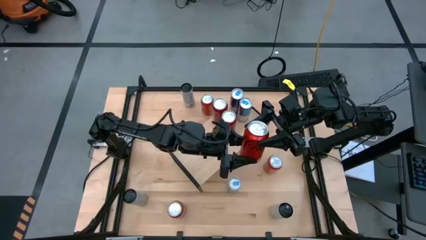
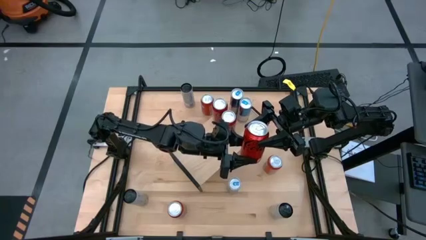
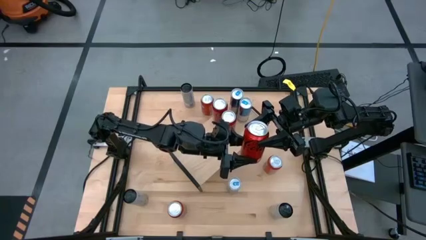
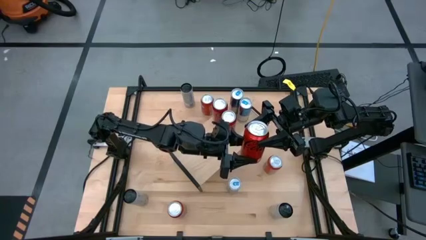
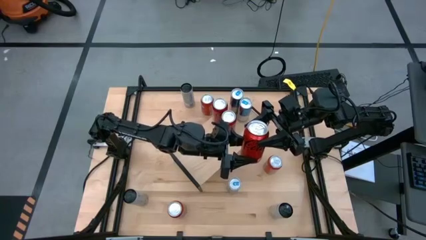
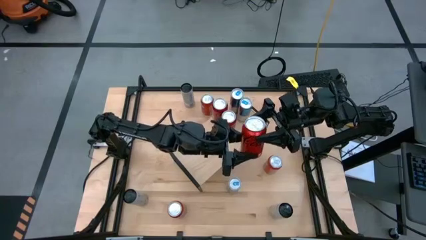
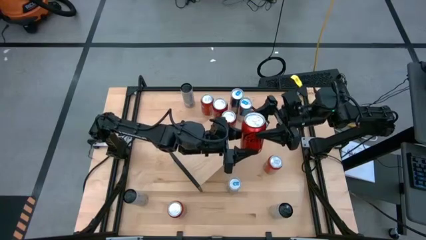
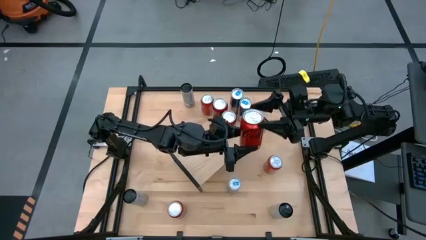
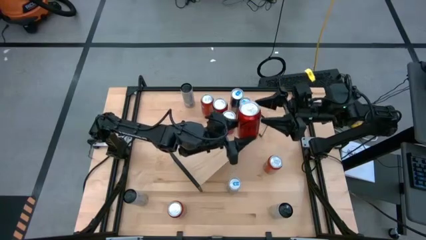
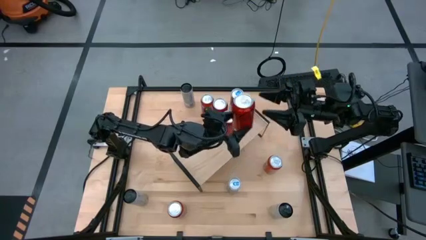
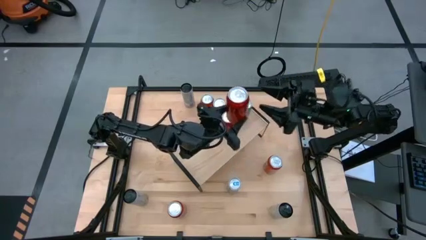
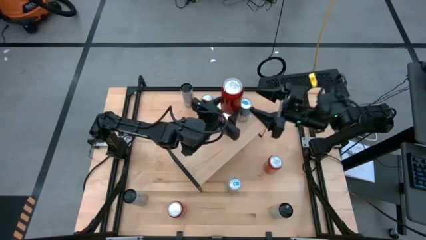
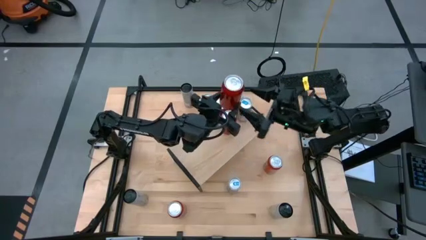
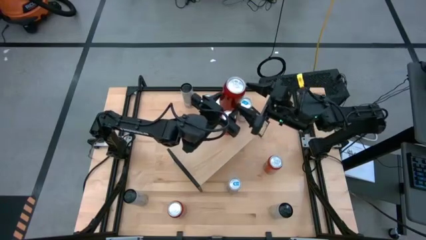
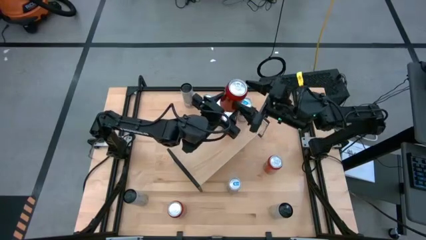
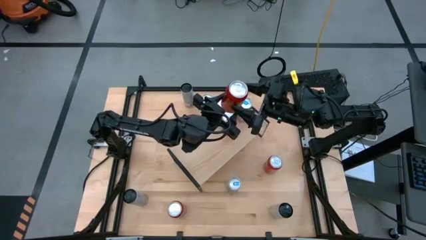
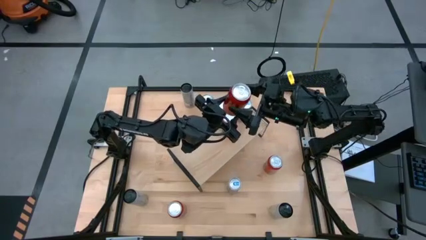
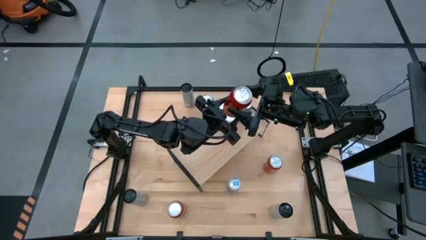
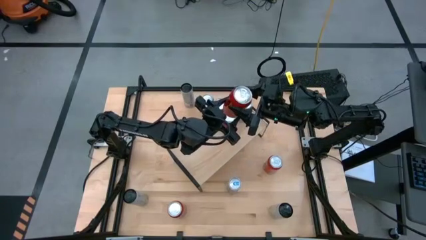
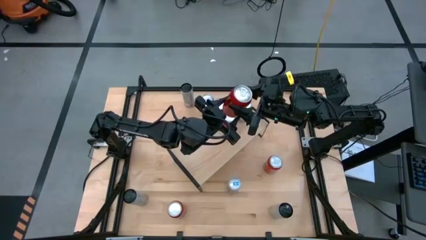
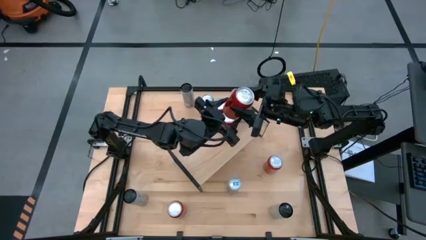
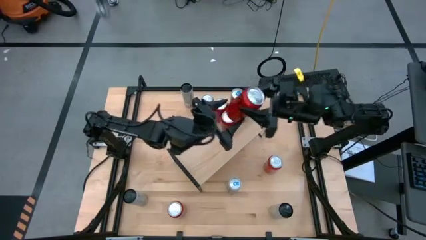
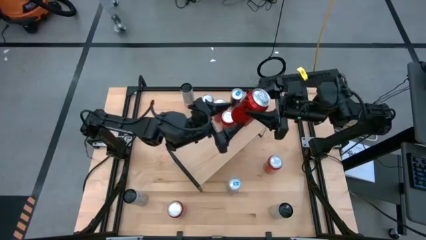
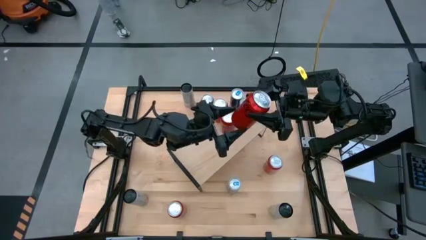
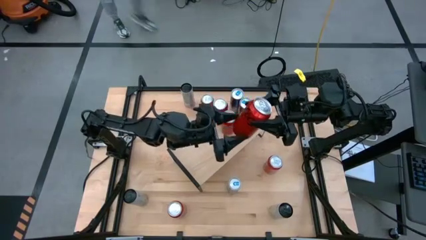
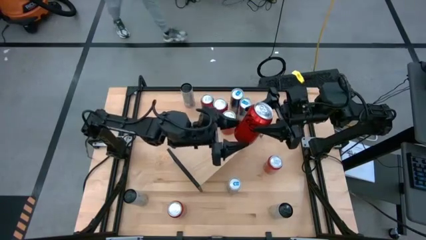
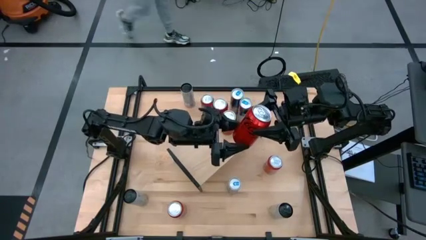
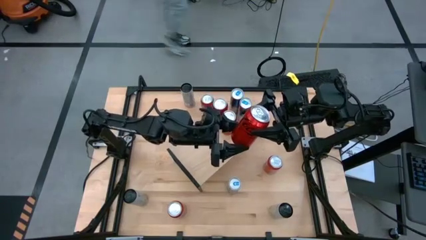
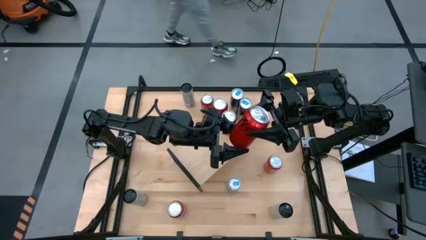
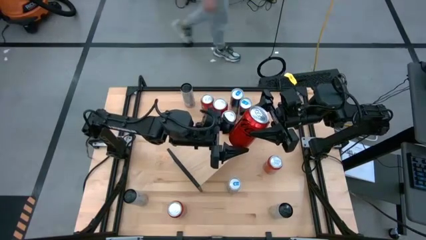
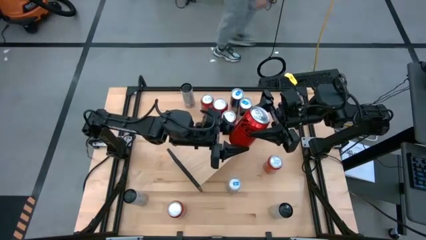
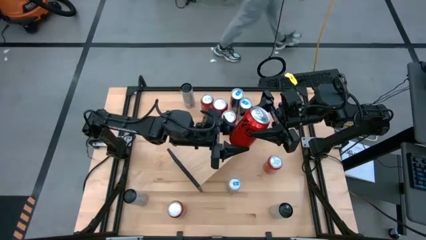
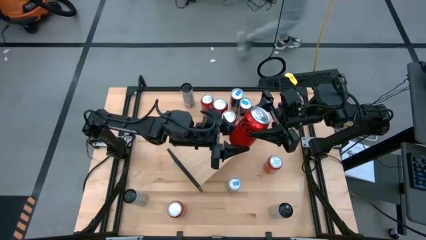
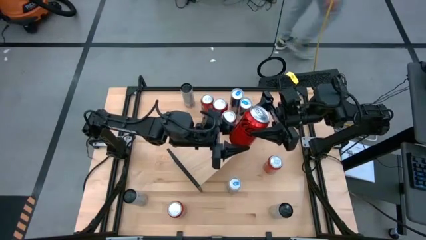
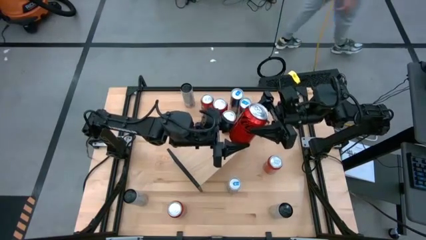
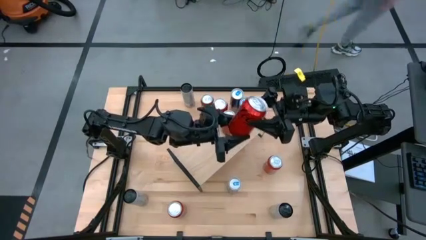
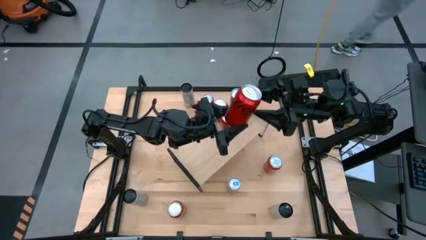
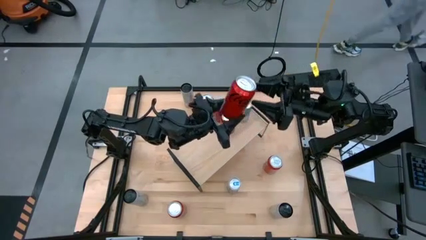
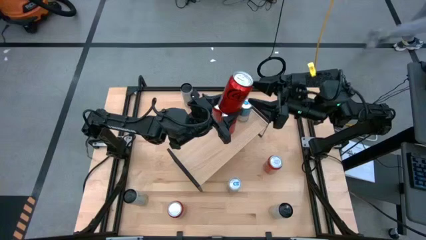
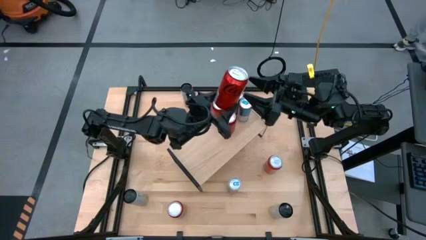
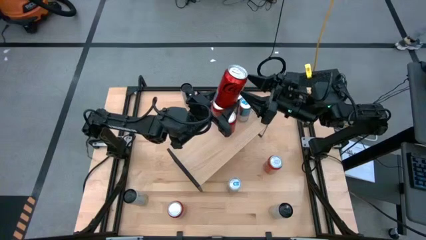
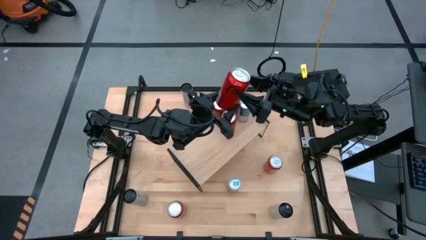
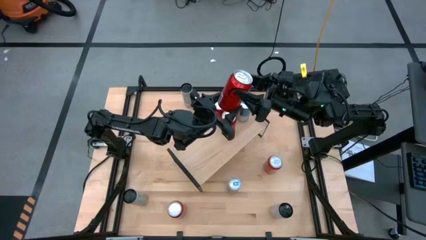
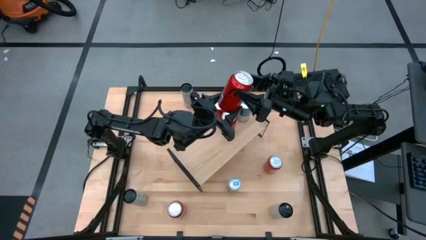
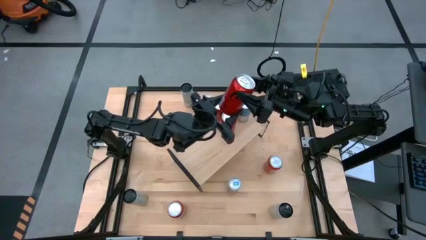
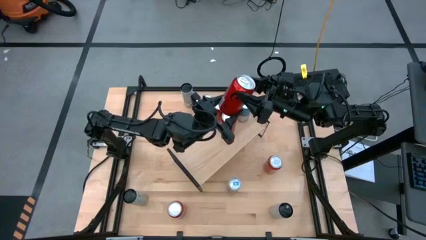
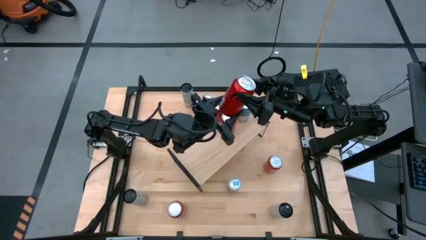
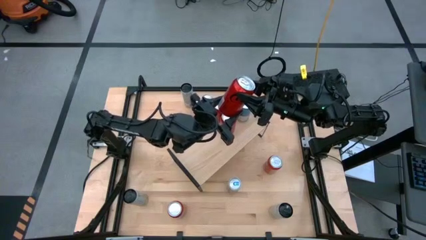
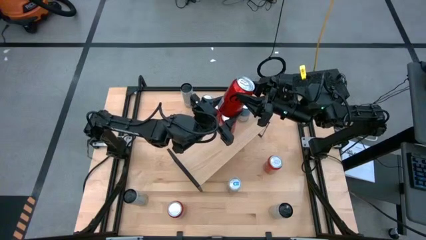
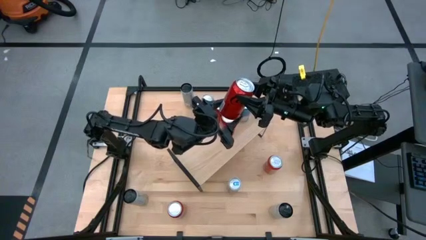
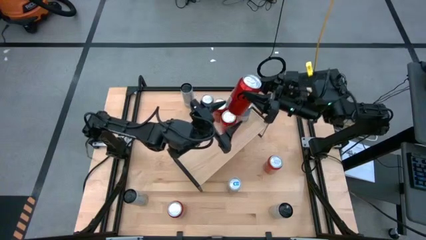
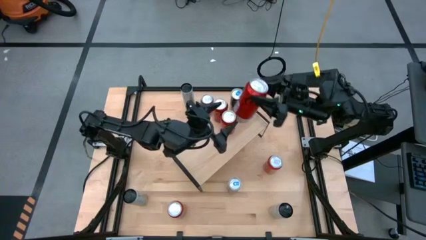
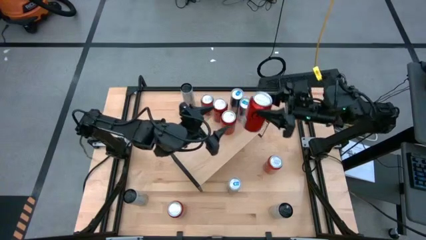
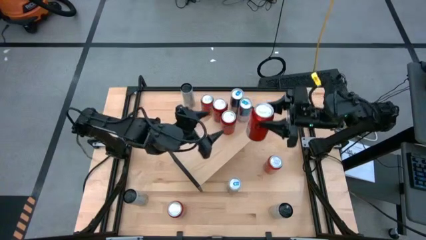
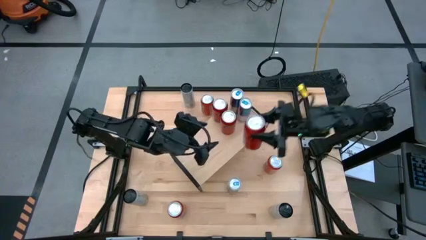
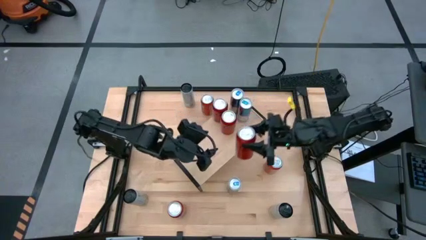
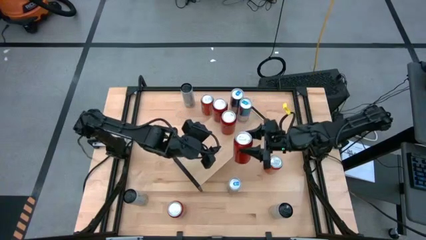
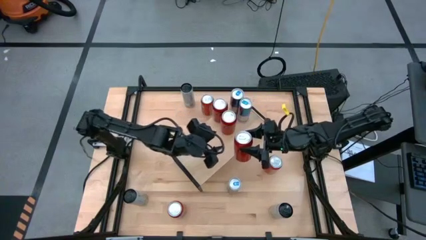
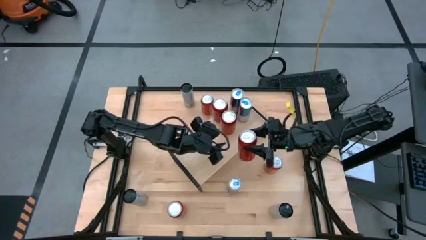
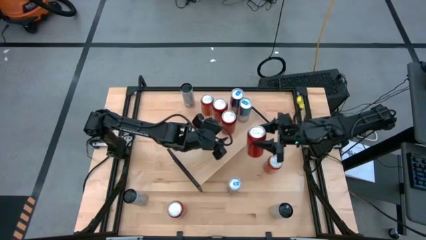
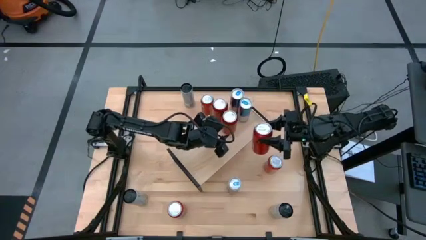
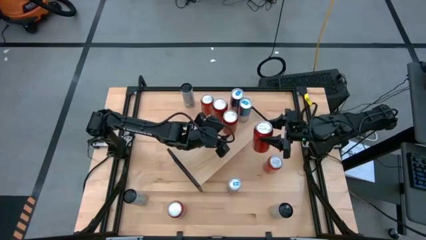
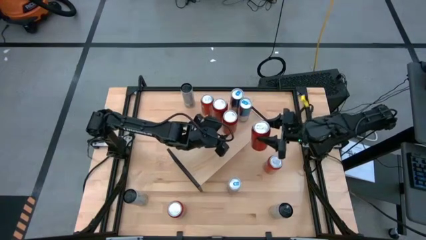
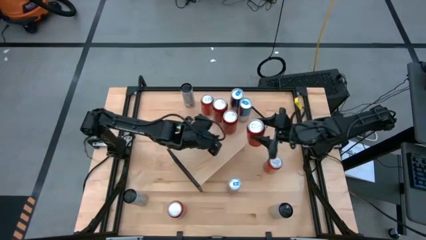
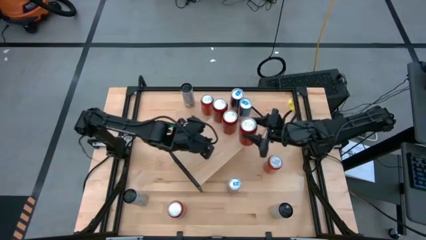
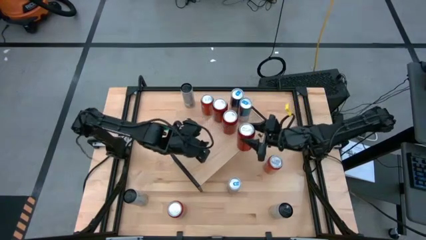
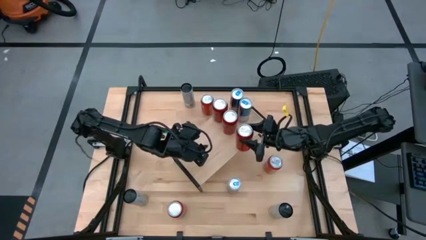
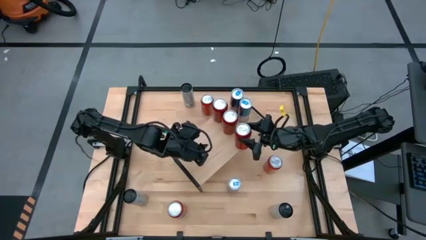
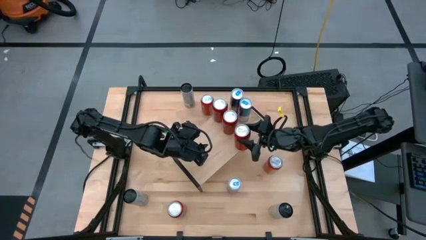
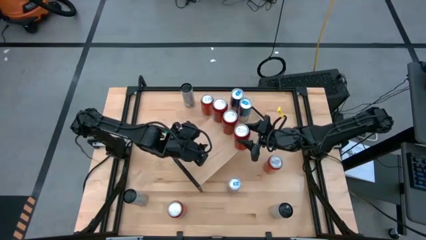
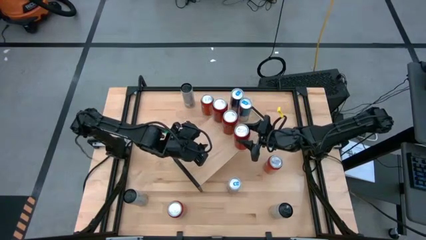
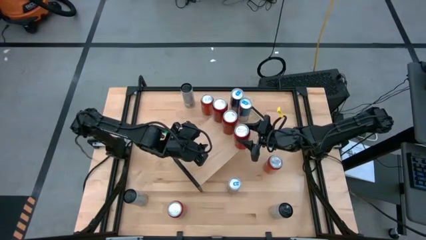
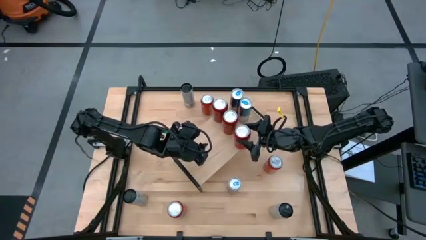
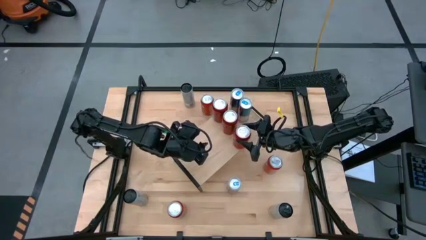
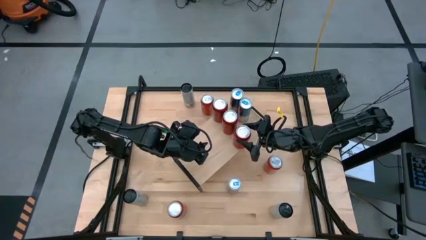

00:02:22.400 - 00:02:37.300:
Task: Place canned beverage on shelf
Put the red soda can on the shelf

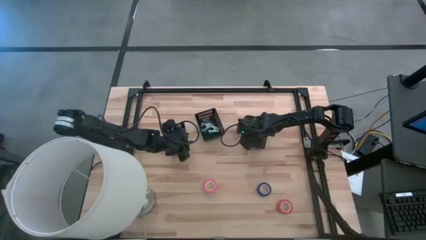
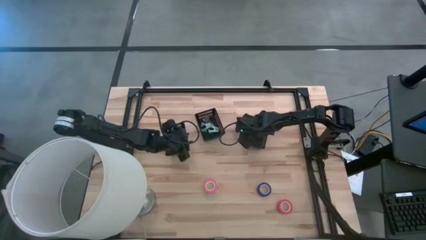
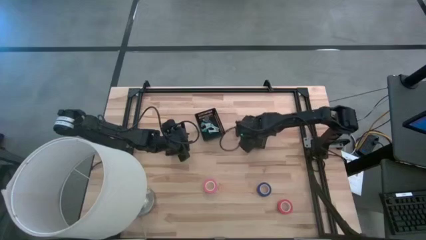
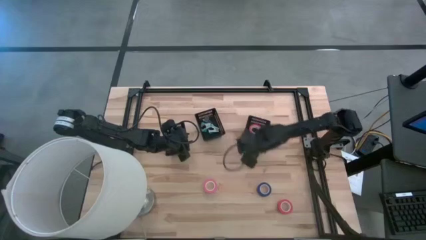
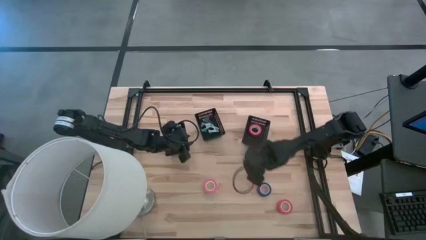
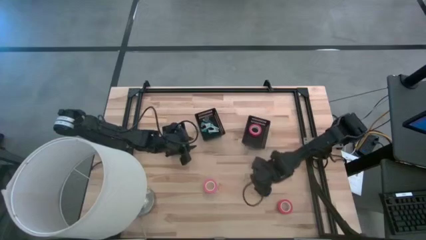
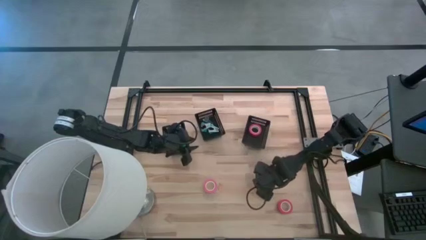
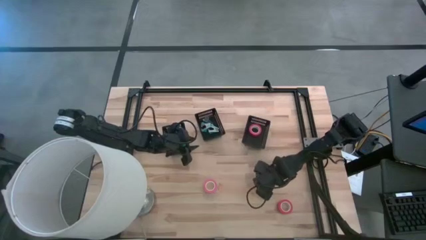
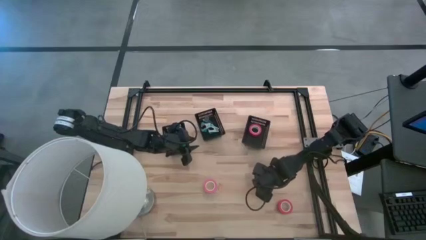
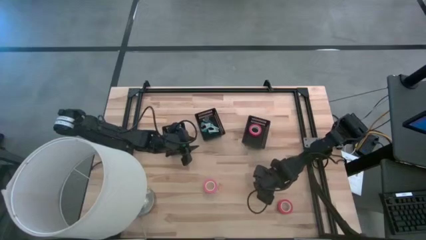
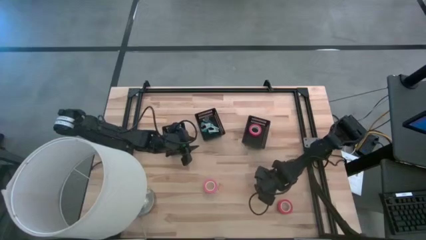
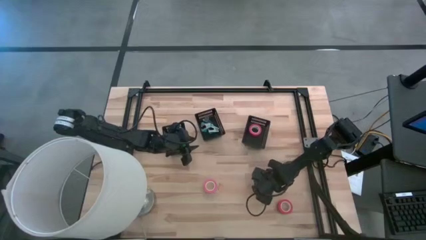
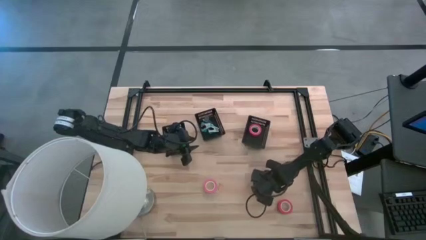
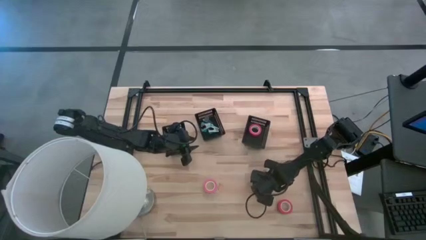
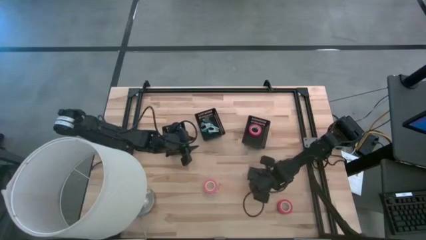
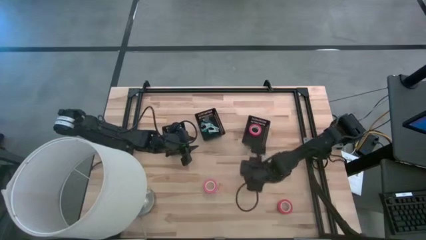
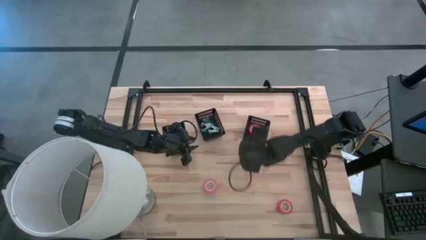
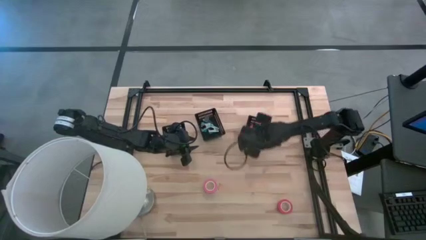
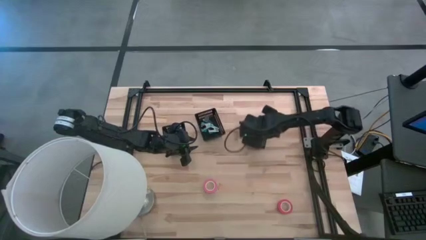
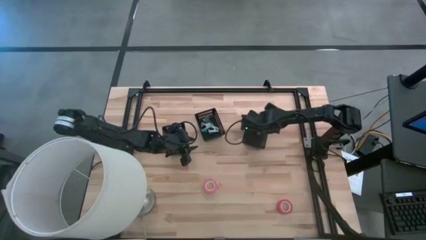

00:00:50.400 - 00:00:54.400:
Task: Pick and place Stapler, Stapler remover, tape
Put the blue tape into the right black bin
